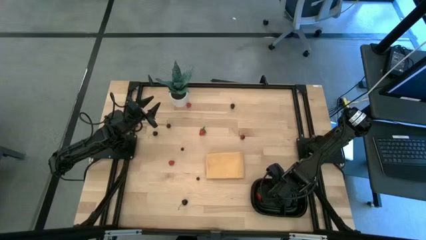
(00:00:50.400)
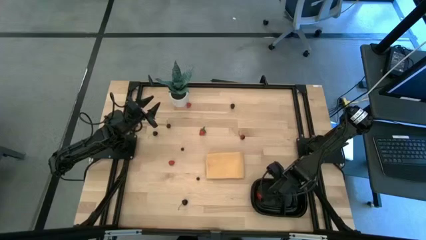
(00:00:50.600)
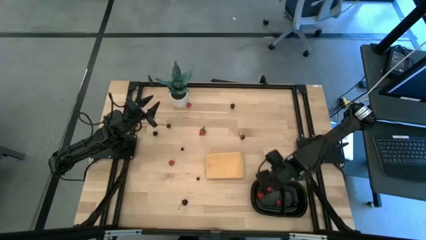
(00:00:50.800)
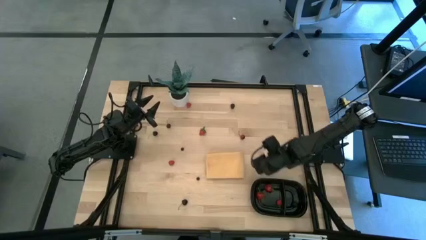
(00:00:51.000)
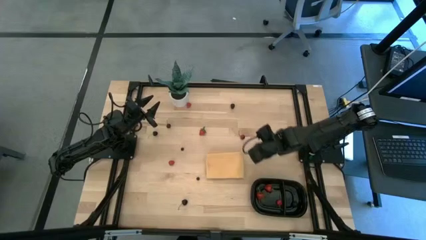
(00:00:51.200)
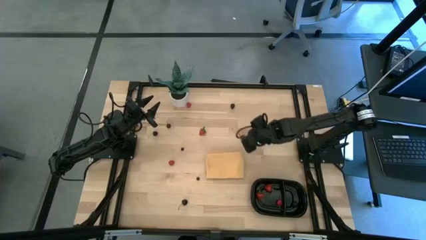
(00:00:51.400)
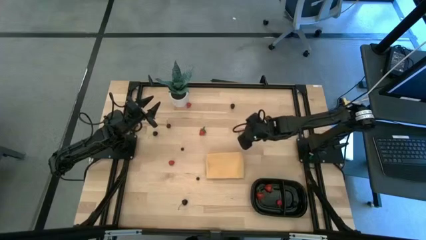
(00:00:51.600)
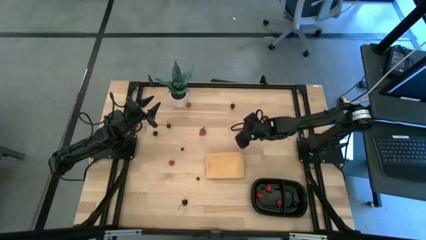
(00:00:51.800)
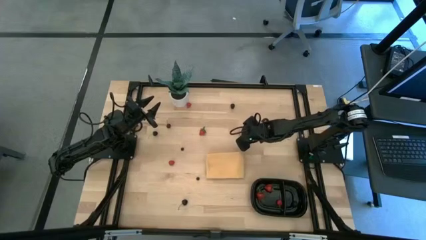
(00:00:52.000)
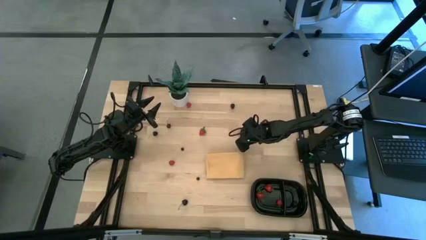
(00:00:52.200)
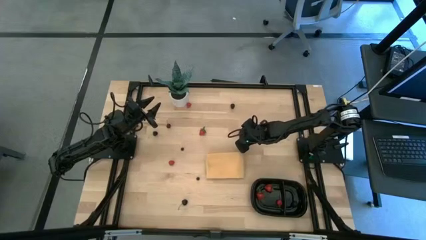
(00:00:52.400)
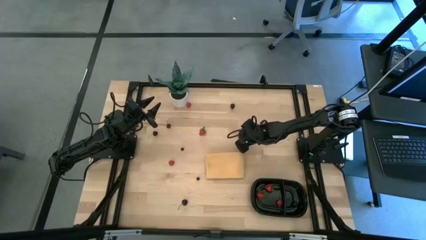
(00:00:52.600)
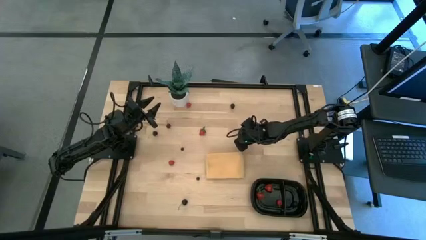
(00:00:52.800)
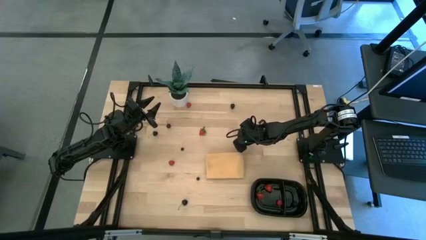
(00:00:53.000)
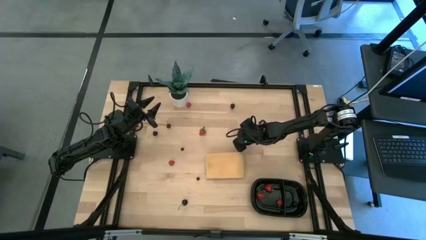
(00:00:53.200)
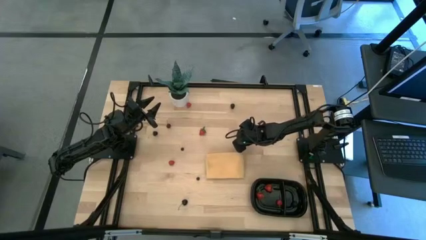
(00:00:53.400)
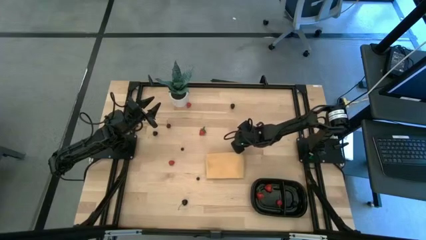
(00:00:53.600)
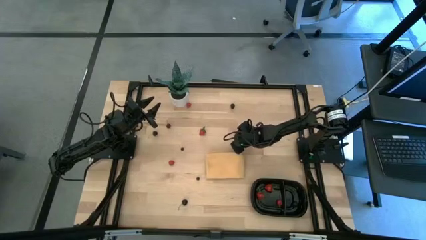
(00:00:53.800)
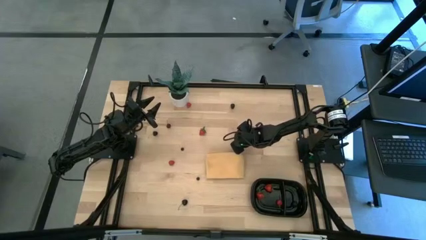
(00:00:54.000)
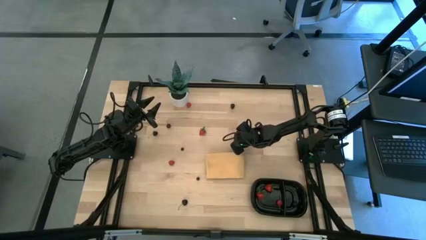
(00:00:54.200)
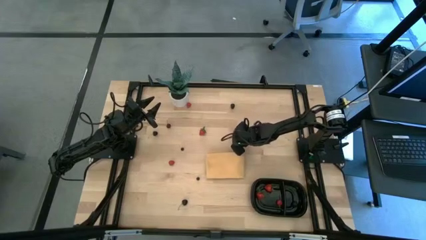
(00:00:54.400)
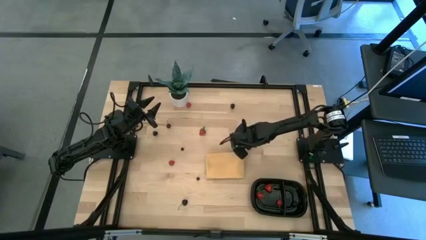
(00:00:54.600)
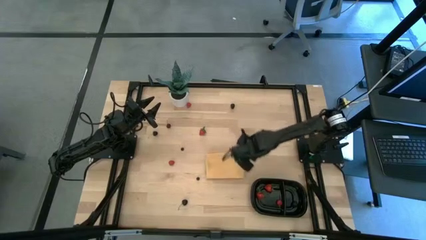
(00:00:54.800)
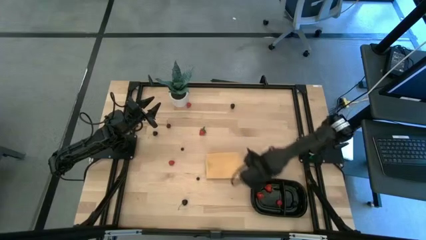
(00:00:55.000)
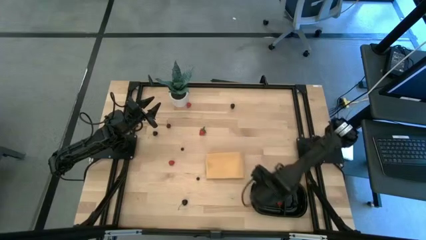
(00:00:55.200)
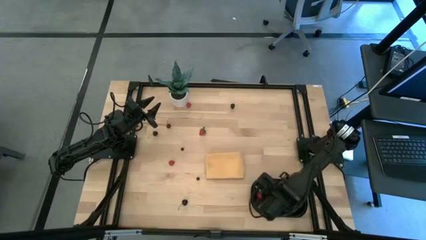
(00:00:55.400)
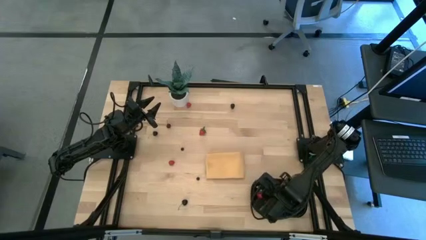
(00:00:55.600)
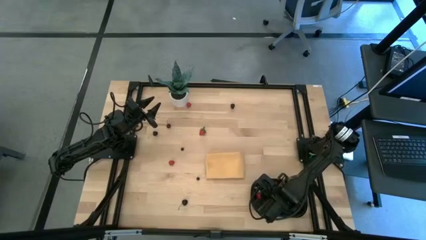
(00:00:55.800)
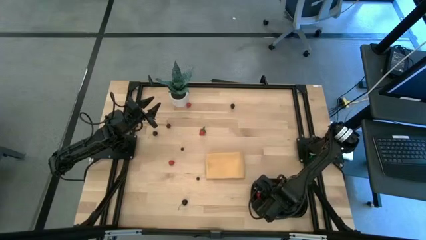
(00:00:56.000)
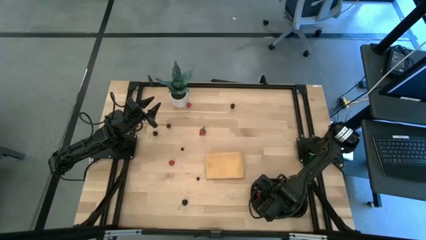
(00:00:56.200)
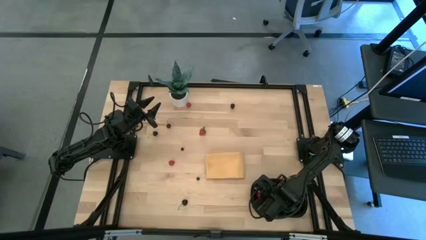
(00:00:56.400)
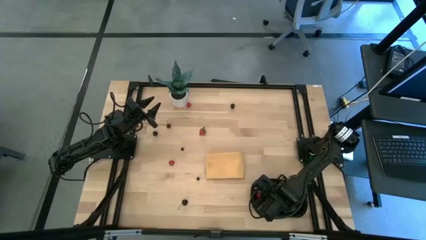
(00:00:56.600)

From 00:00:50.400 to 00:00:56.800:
Task: Pick and placing Produce into tupperware
Put the top red cherry into the black container

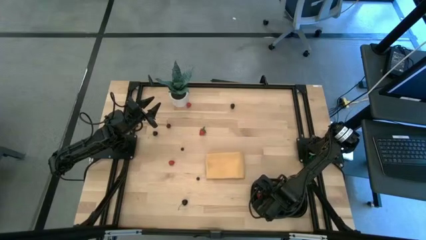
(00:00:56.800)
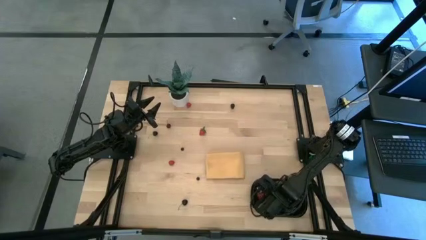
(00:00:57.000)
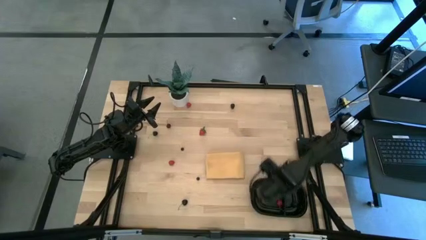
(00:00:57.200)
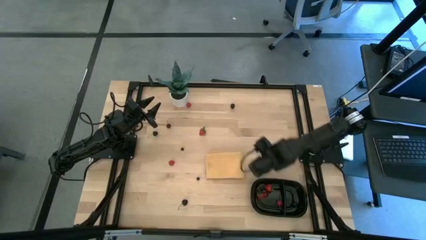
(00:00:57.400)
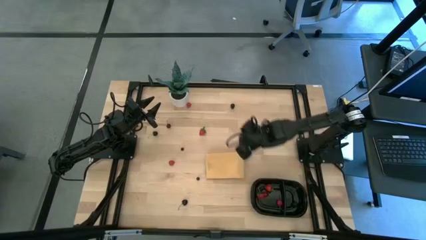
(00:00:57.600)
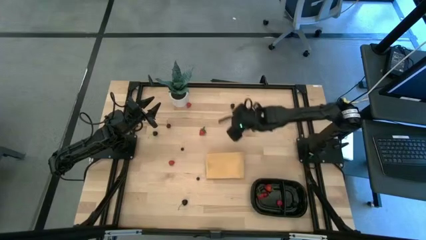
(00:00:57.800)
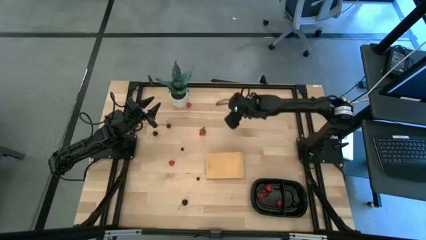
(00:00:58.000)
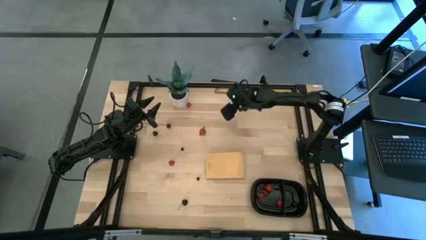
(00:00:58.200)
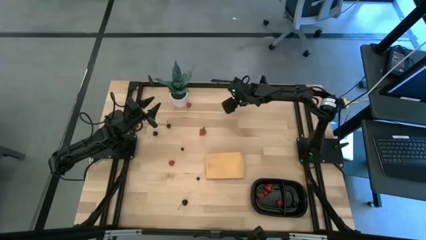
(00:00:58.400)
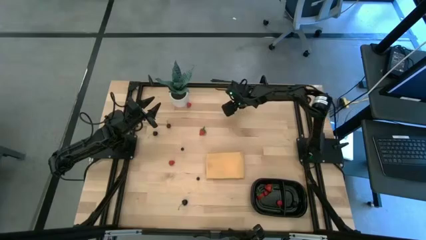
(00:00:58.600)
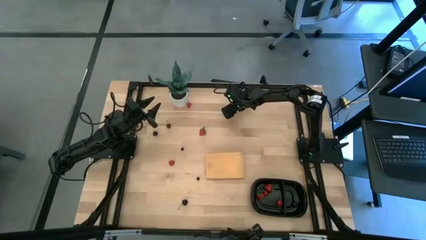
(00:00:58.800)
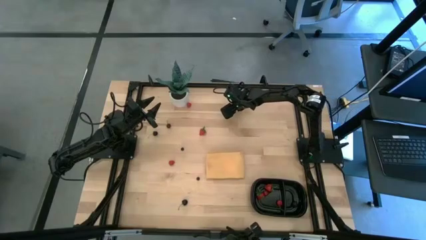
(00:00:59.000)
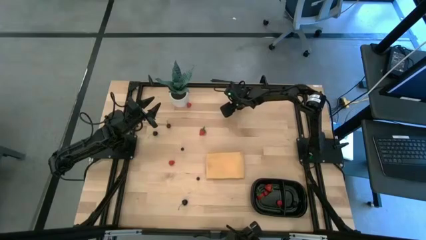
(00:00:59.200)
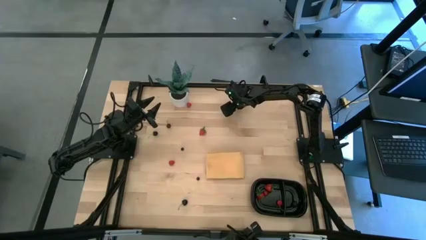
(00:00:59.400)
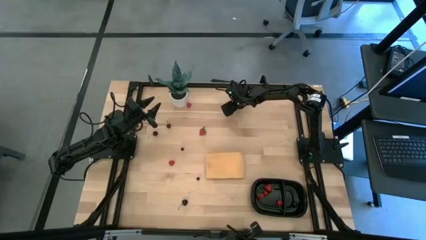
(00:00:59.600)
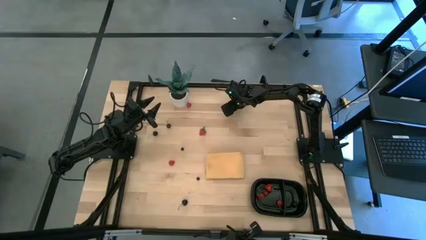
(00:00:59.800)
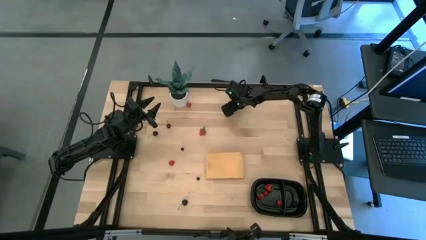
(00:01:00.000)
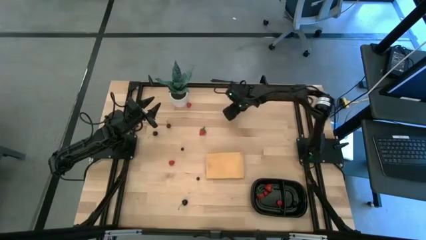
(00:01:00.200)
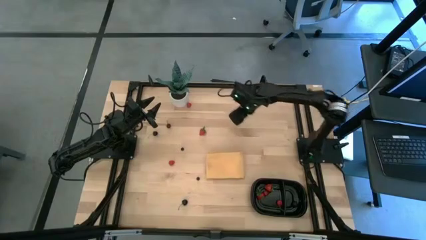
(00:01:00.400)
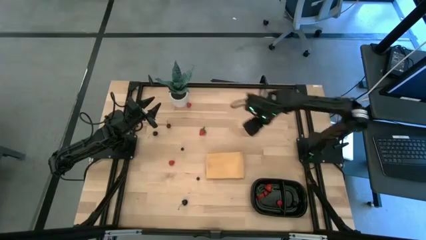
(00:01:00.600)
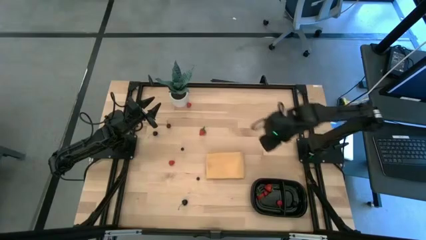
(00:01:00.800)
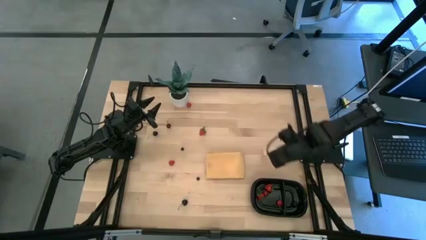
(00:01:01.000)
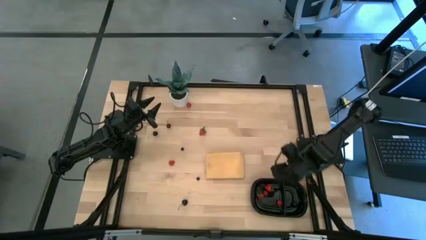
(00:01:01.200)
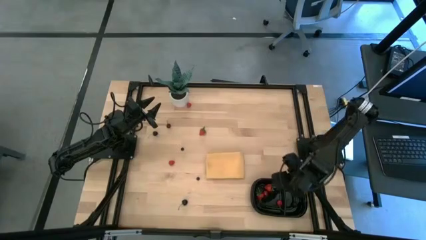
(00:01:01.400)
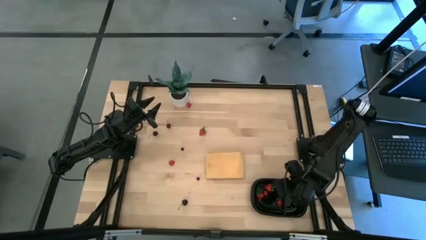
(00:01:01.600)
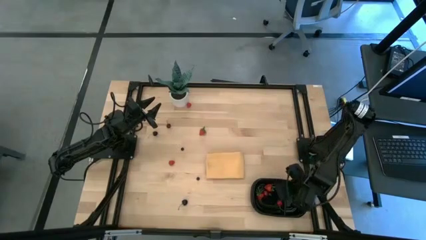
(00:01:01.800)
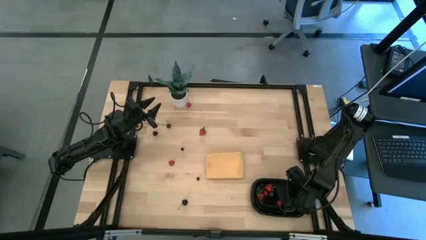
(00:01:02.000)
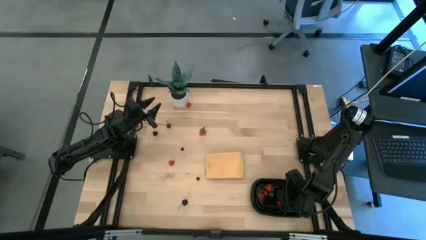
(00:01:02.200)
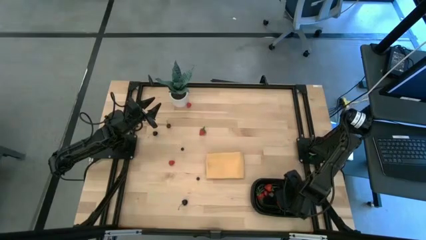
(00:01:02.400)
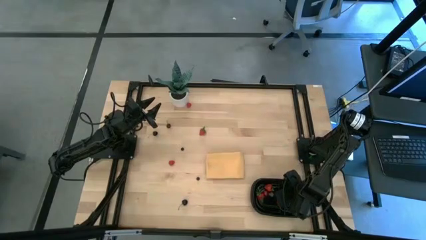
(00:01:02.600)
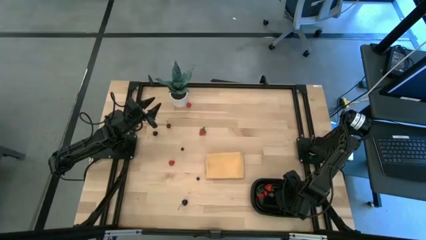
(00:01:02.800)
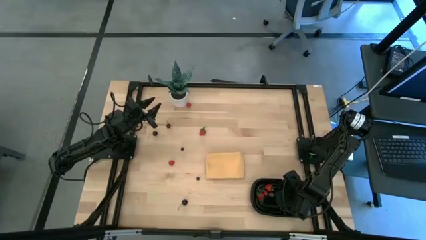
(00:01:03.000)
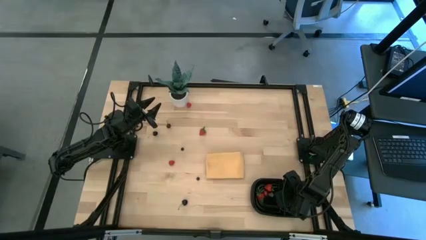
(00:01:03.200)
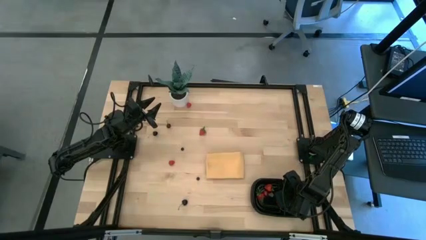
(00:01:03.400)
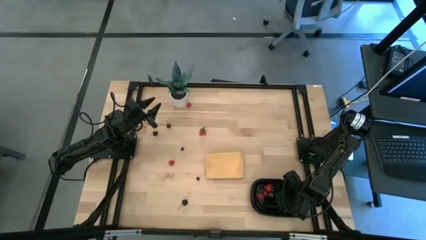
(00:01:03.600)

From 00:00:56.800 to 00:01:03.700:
Put the black berry into the black container
